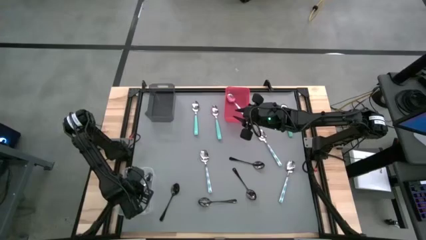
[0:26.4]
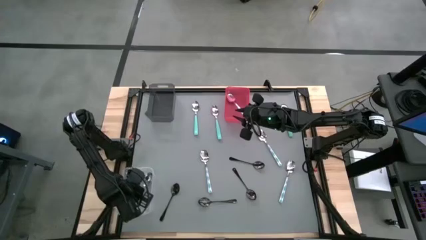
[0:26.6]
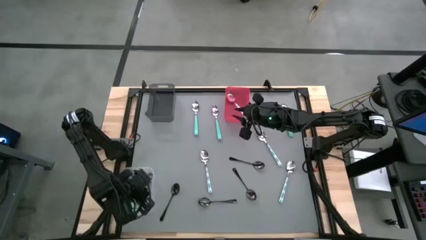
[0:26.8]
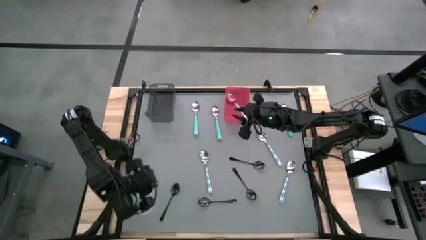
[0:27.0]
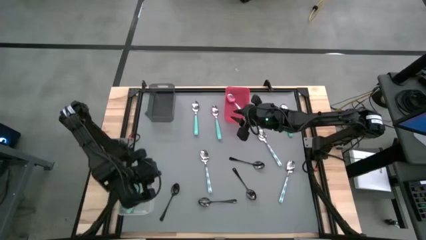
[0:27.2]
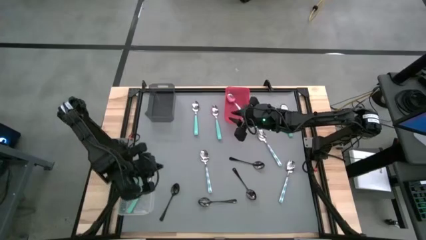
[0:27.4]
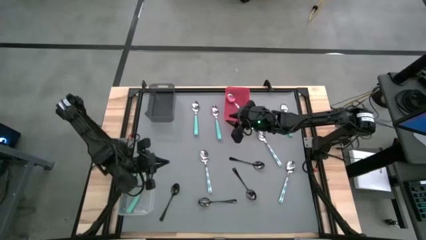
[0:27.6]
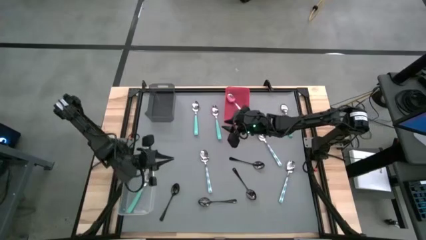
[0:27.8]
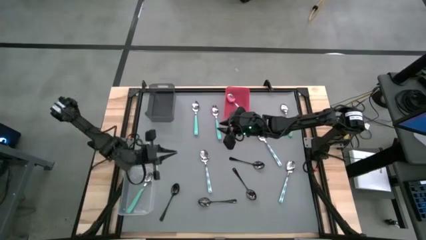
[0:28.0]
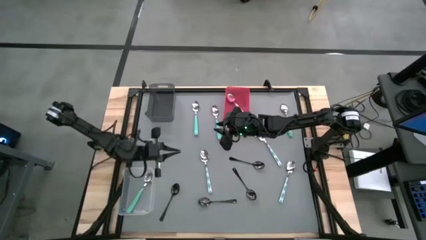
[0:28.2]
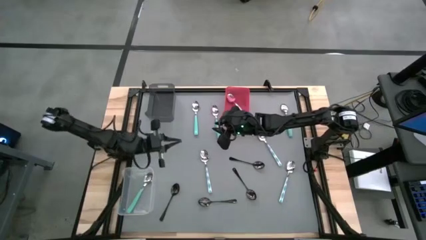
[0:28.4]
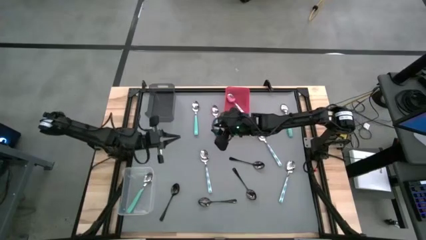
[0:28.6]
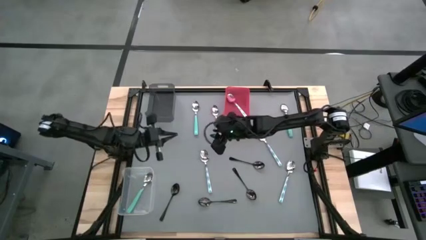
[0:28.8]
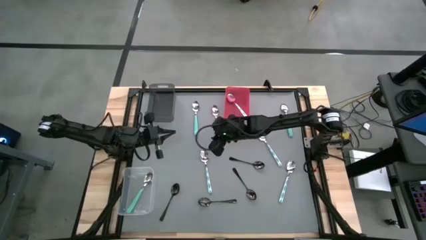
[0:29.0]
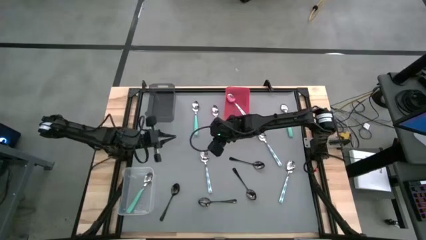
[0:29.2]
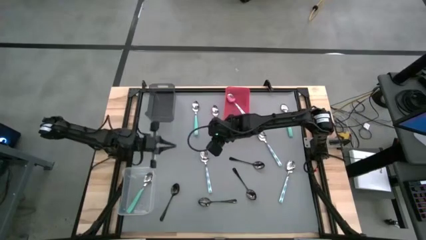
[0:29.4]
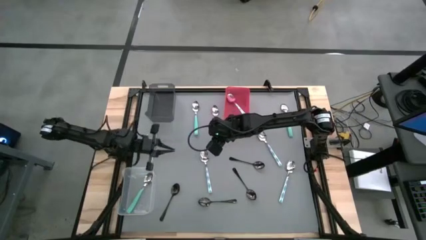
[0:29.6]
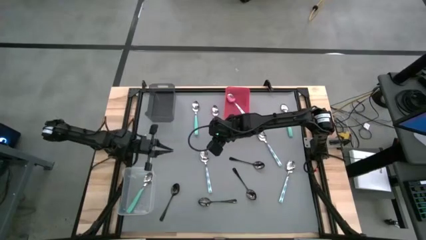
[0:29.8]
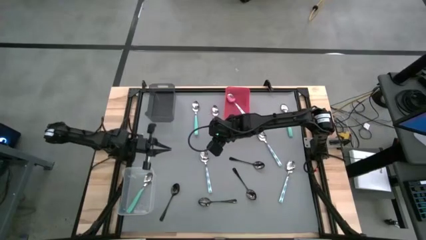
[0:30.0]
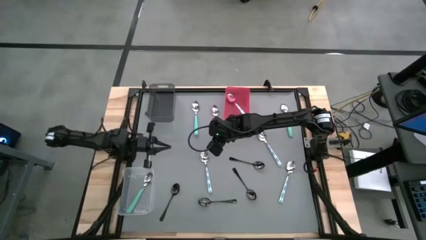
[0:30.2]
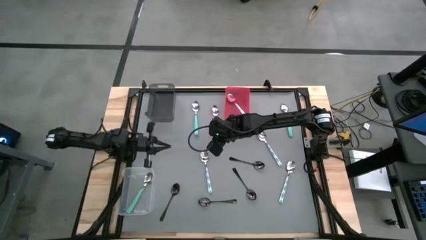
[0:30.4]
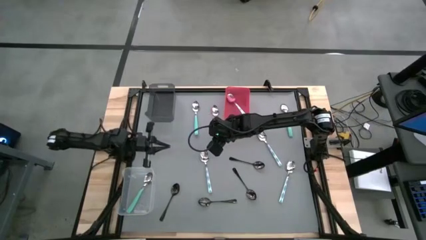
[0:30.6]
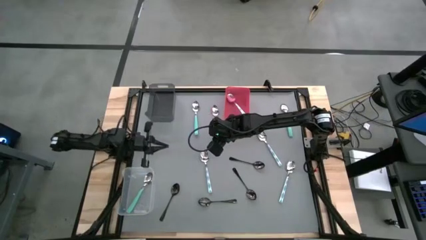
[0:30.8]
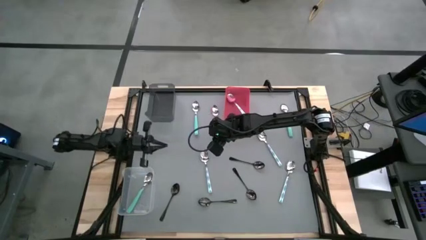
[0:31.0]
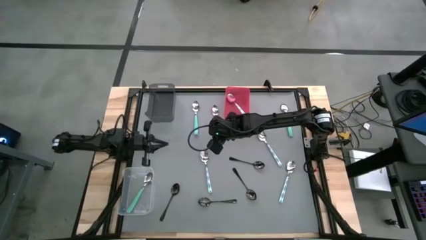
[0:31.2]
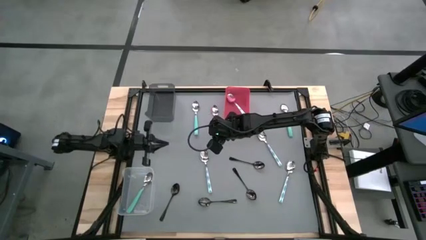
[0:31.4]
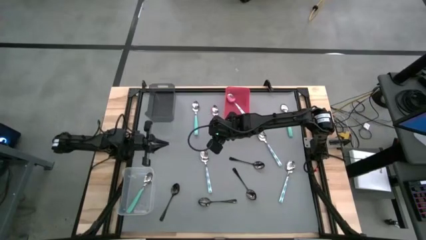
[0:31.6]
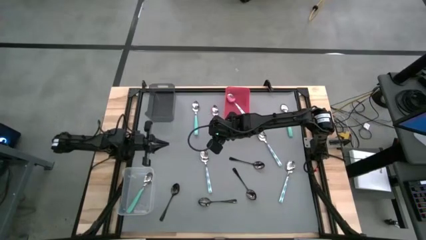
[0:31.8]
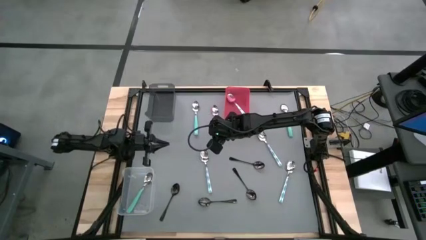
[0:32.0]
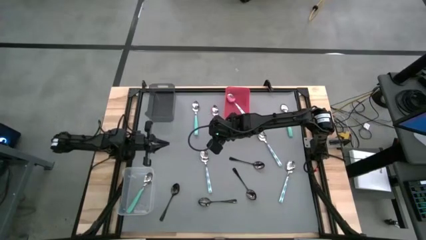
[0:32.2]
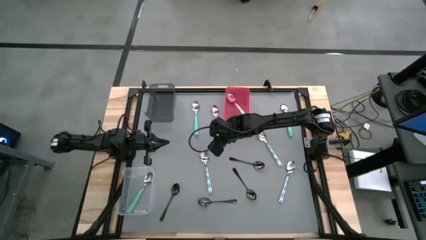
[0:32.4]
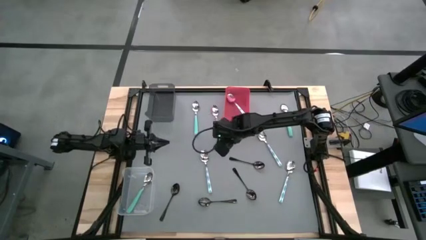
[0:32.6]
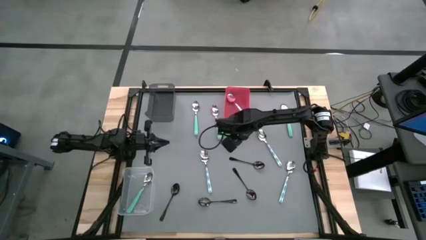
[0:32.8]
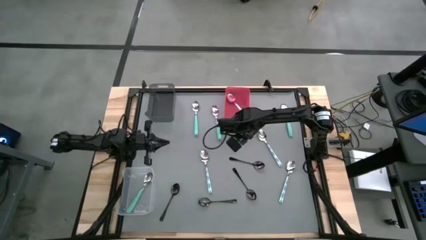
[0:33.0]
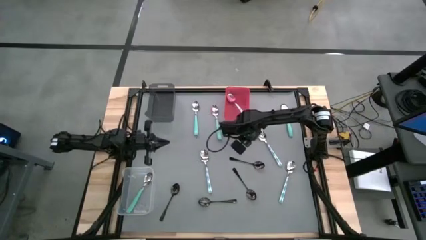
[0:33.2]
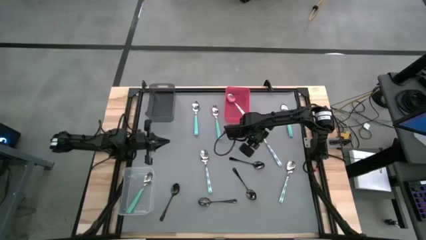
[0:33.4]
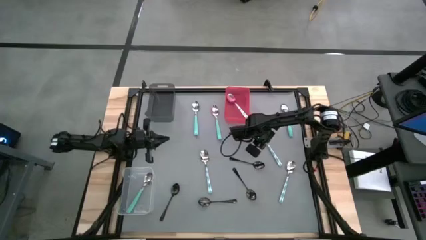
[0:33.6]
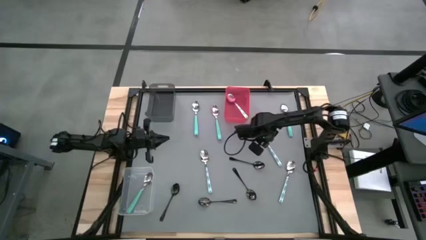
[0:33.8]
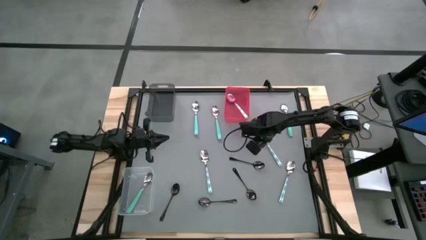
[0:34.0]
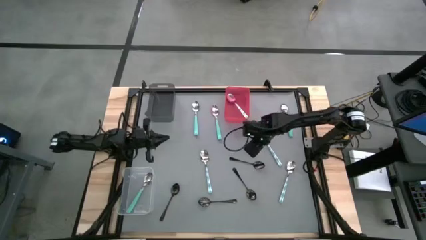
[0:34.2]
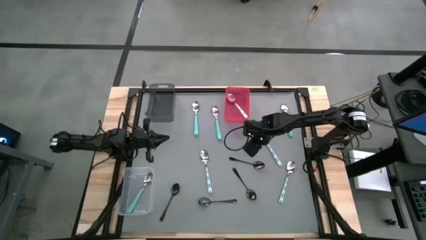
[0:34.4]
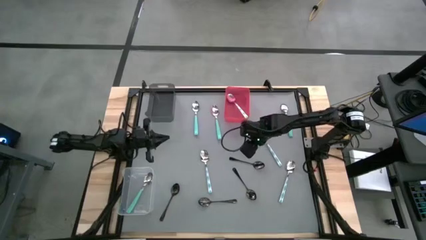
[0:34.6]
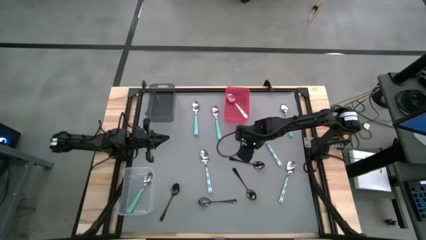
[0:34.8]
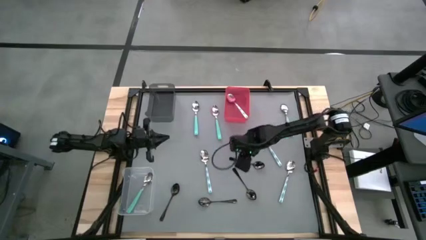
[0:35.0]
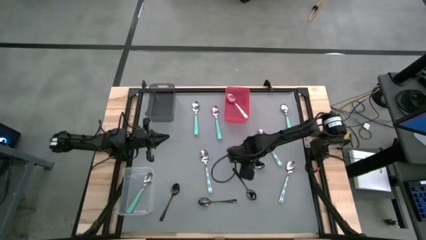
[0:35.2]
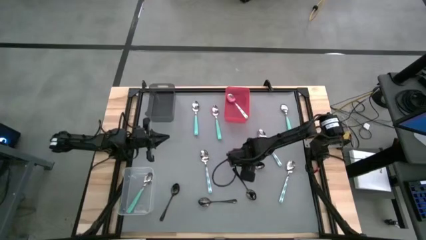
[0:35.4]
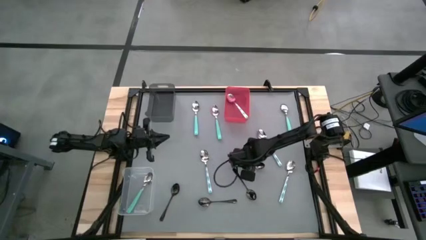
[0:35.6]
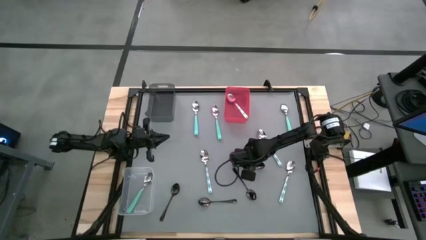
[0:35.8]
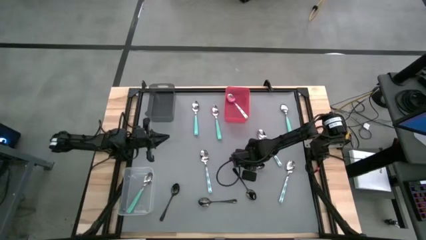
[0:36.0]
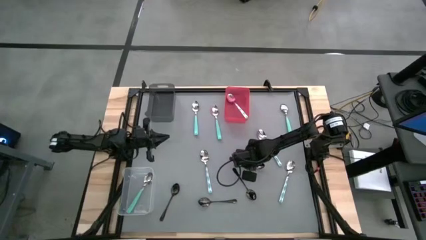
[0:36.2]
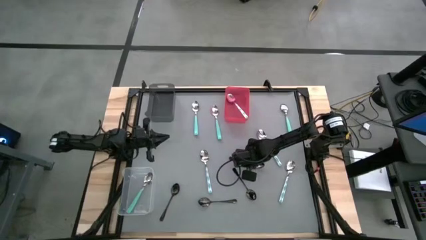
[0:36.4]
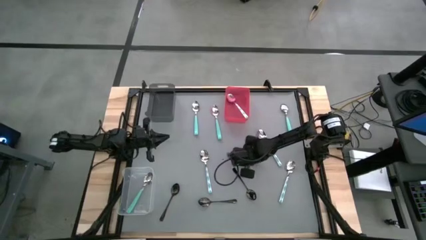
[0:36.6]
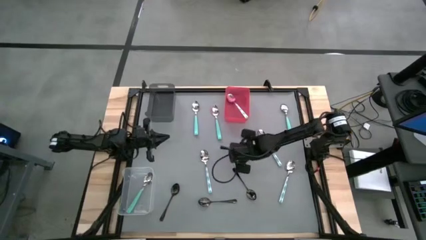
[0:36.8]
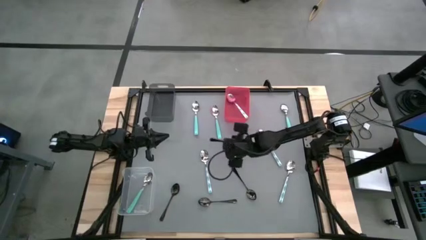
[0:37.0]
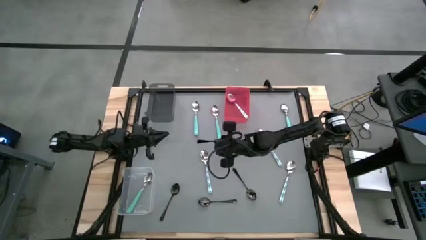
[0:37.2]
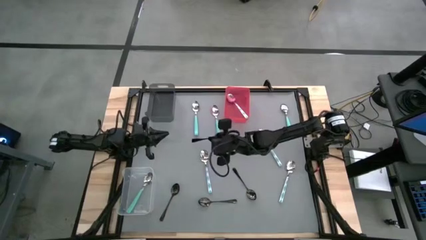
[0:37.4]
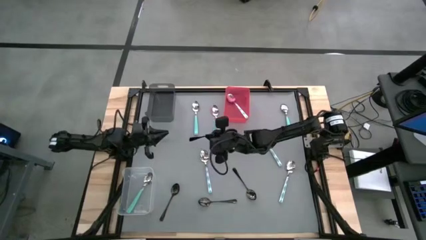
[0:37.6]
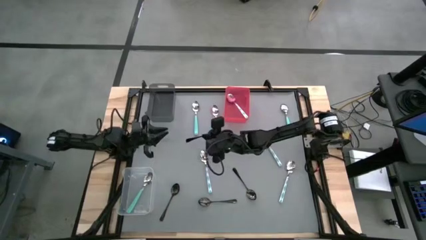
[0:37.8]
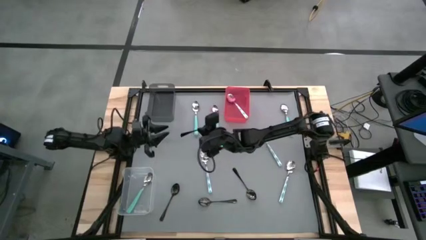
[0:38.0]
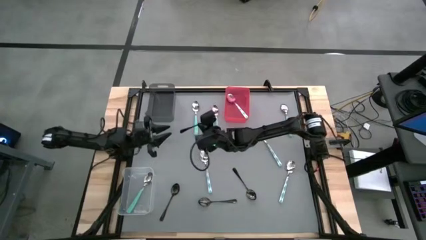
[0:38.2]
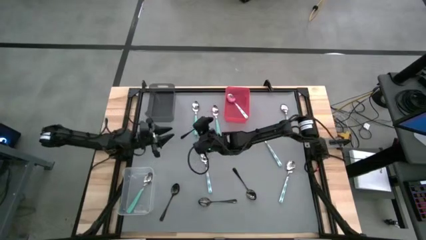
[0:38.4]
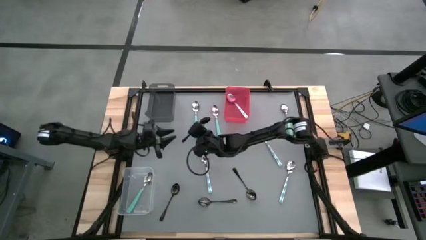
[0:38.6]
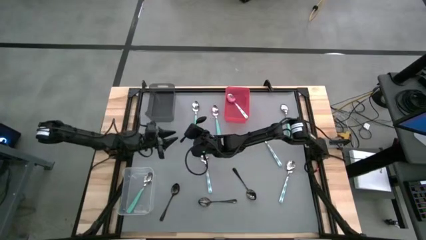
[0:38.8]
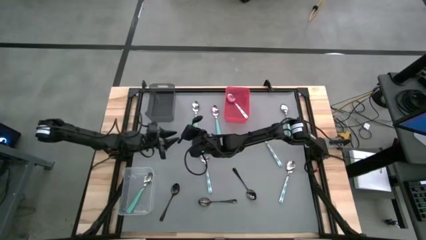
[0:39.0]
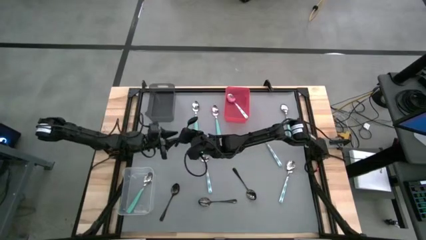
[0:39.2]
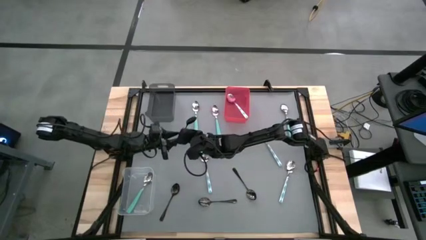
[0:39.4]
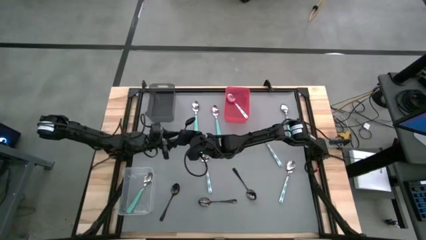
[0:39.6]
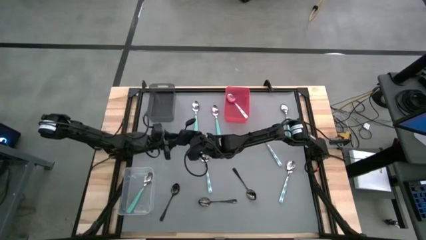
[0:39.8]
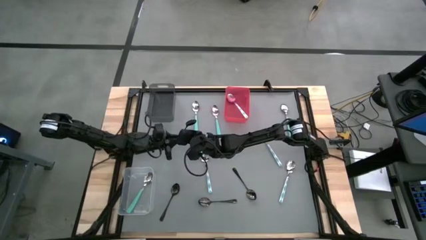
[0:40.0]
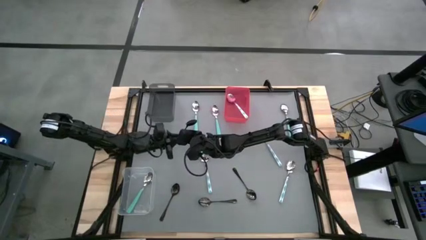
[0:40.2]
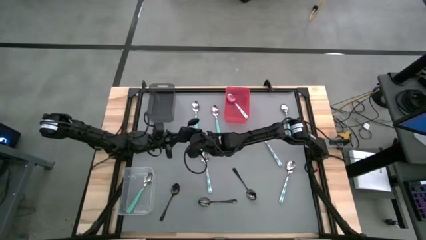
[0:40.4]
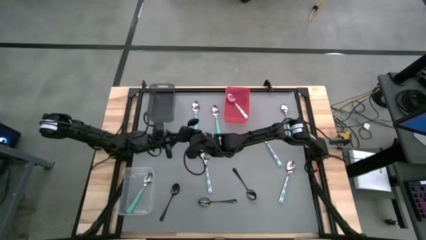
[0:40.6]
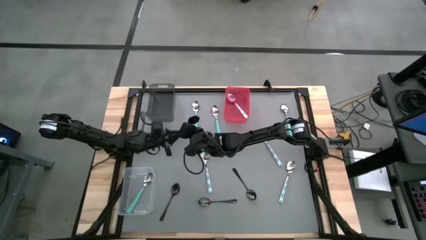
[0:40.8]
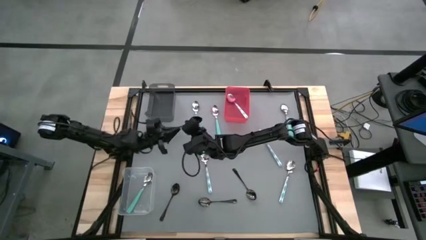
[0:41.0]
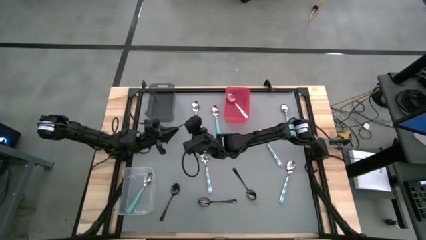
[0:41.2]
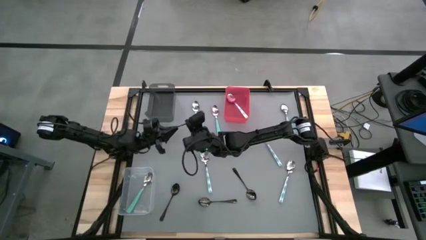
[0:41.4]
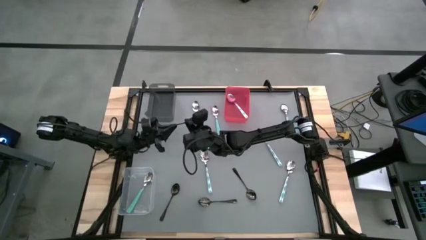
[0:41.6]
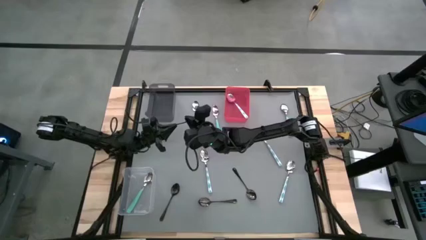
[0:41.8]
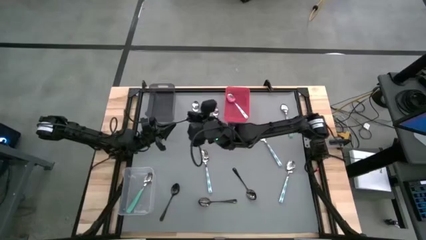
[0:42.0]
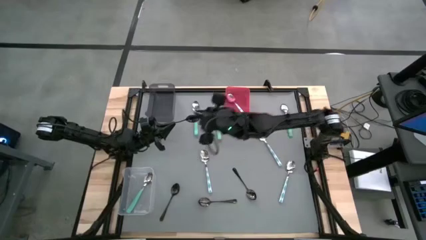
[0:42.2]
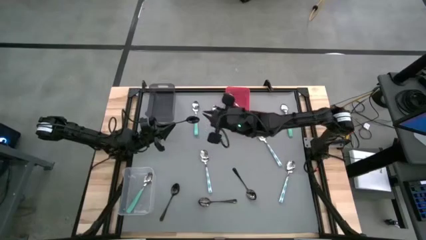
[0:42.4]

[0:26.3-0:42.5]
Task: Sort silverware by color (type)
Put the black spoon into the black bin

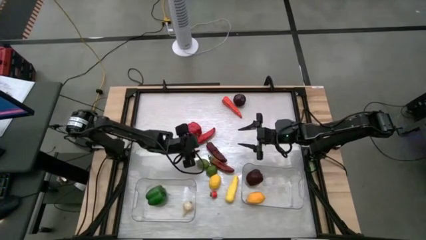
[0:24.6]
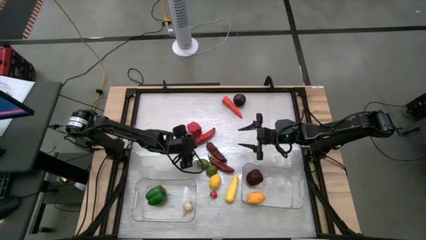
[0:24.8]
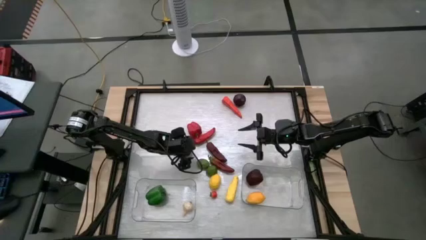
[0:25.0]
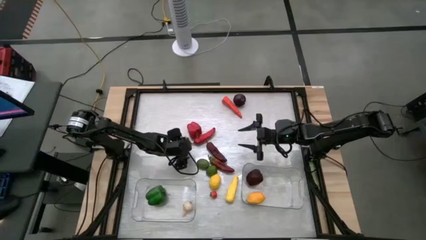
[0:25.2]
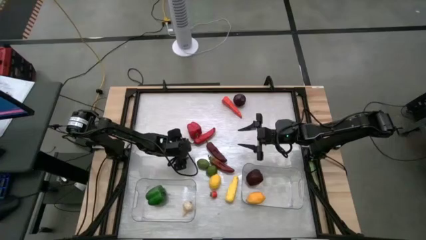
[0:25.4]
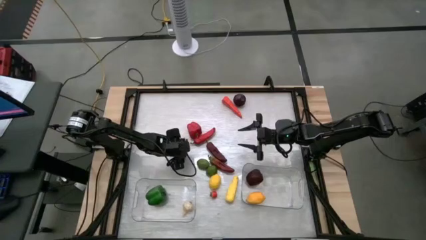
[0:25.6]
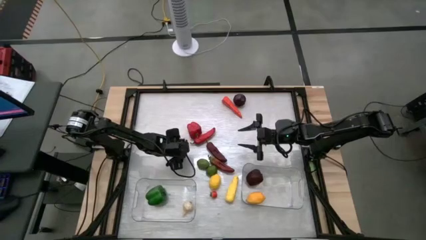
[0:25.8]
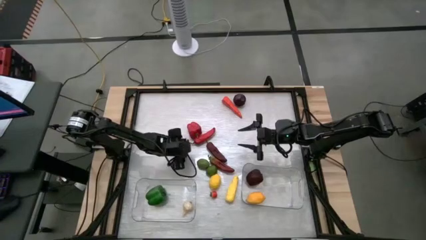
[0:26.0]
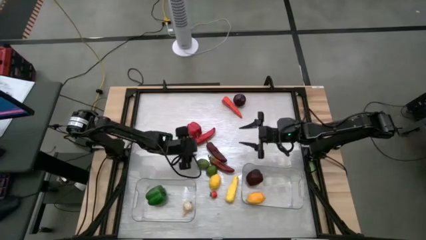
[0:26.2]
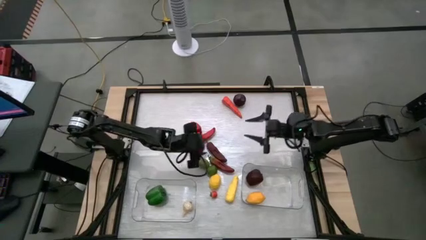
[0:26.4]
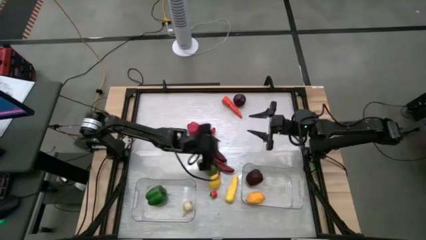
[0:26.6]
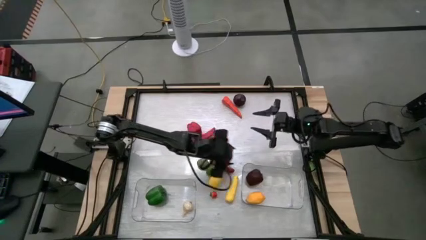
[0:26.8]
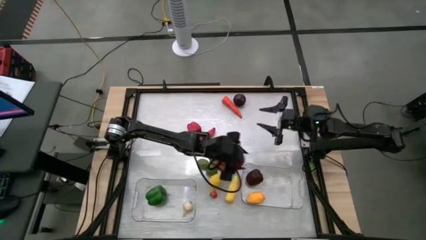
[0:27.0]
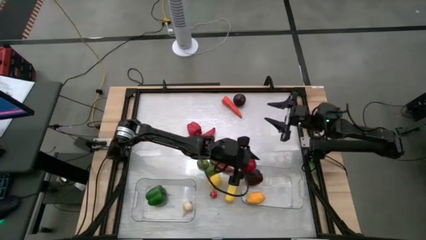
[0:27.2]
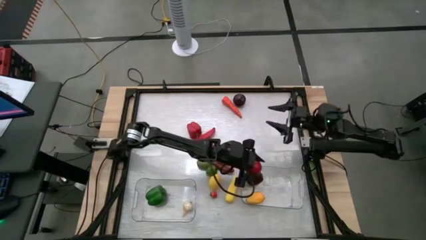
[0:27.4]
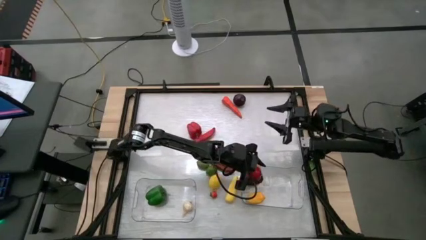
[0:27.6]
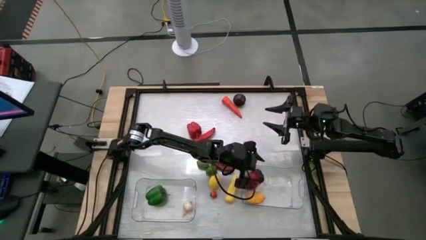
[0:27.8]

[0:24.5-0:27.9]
Task: Sort produce into baskets
Put the red tomato into the right transparent bin
